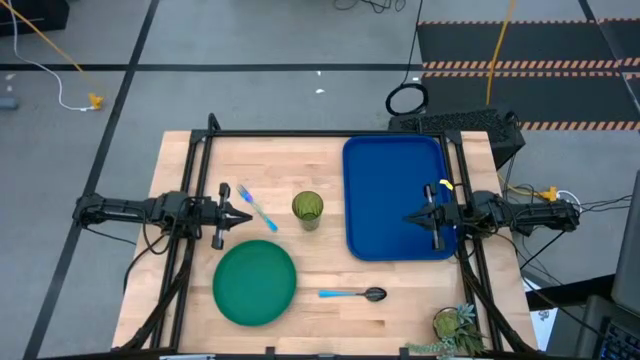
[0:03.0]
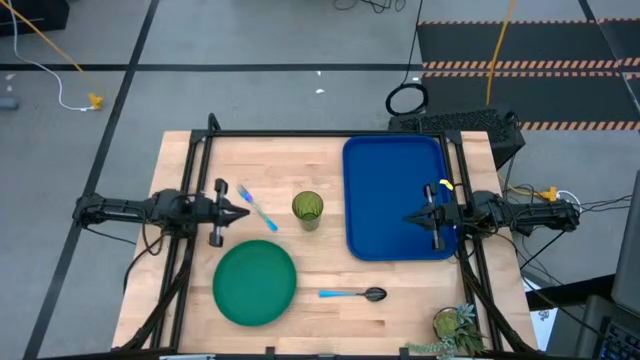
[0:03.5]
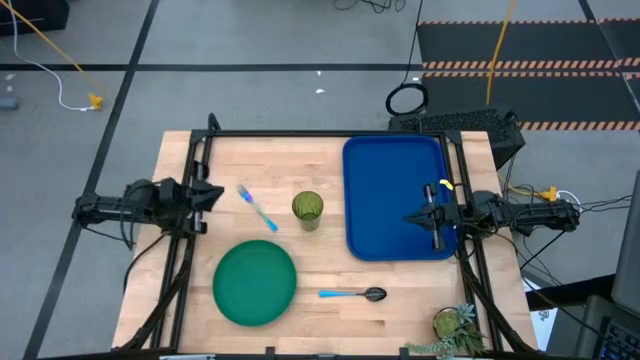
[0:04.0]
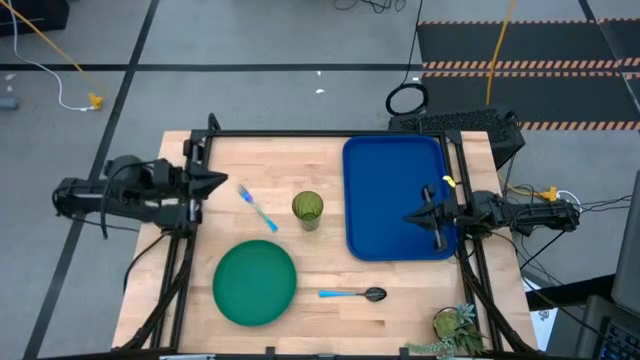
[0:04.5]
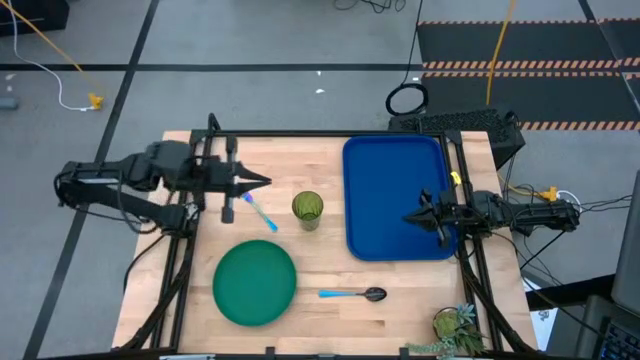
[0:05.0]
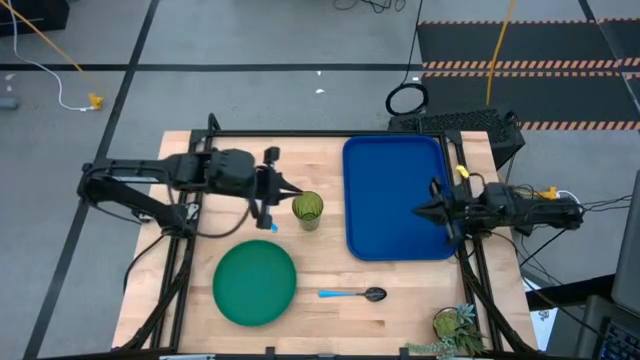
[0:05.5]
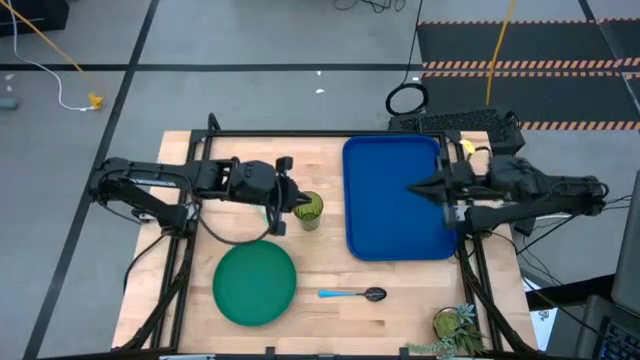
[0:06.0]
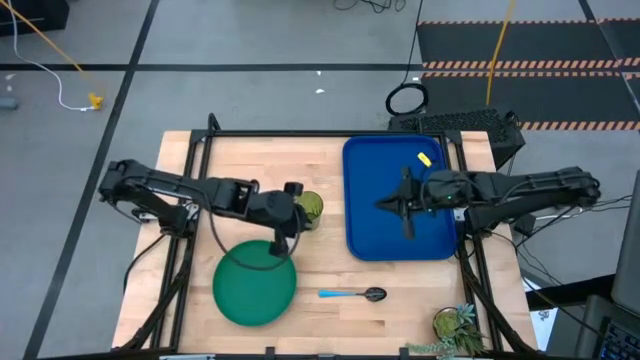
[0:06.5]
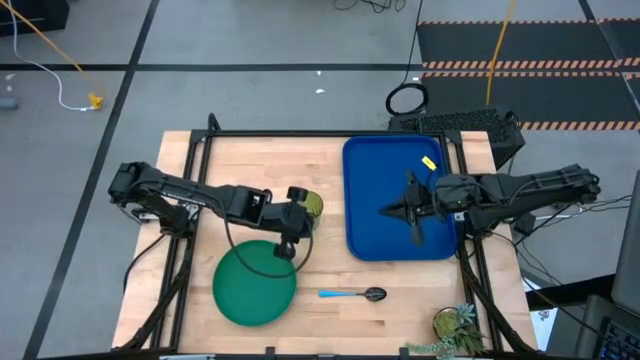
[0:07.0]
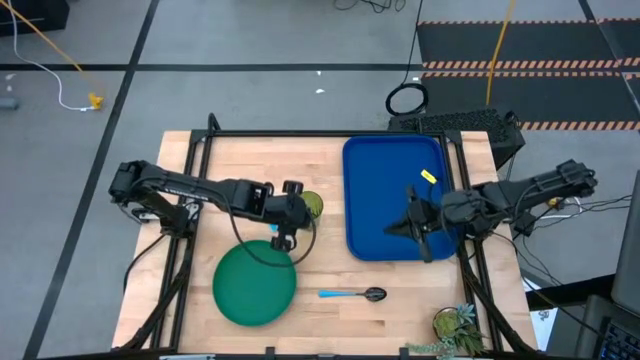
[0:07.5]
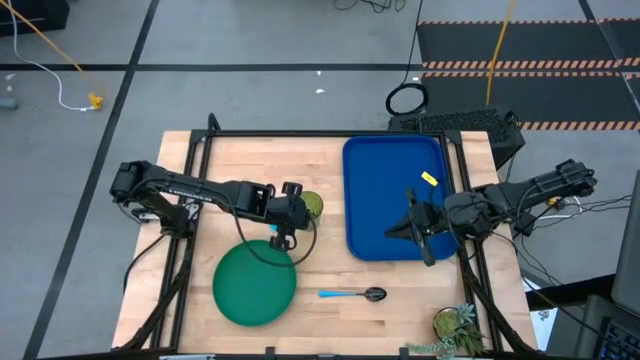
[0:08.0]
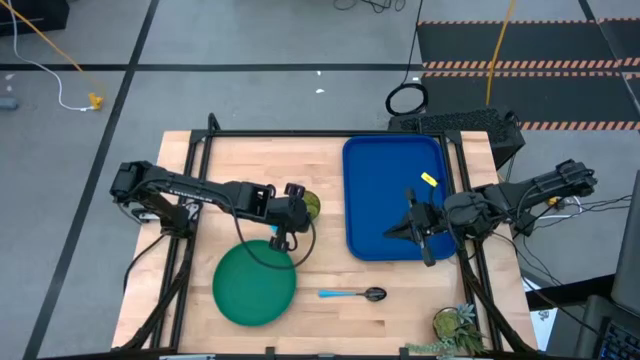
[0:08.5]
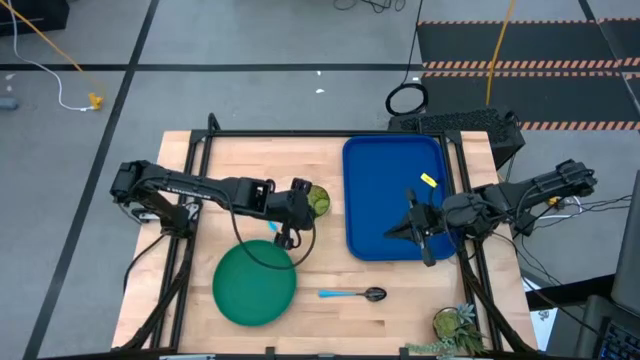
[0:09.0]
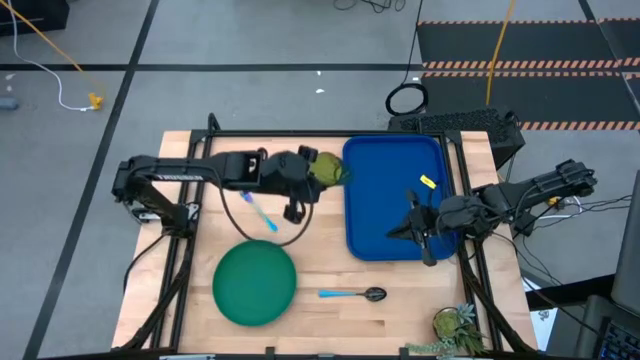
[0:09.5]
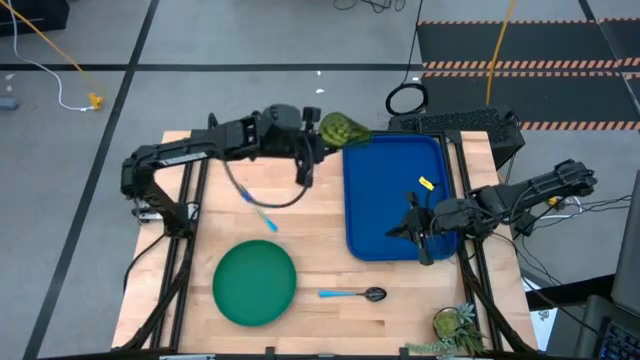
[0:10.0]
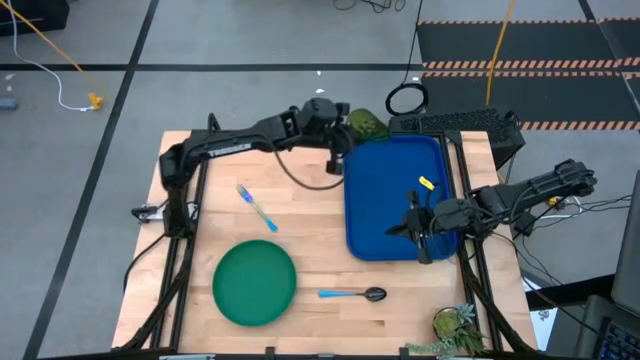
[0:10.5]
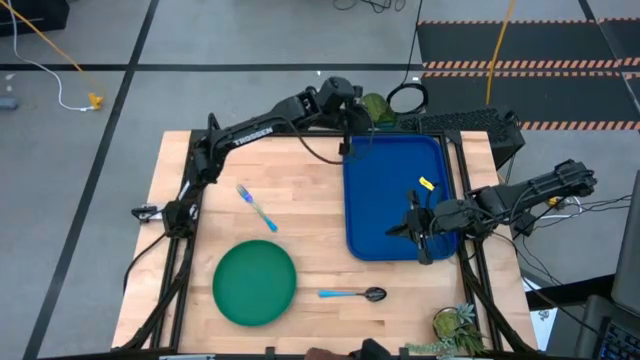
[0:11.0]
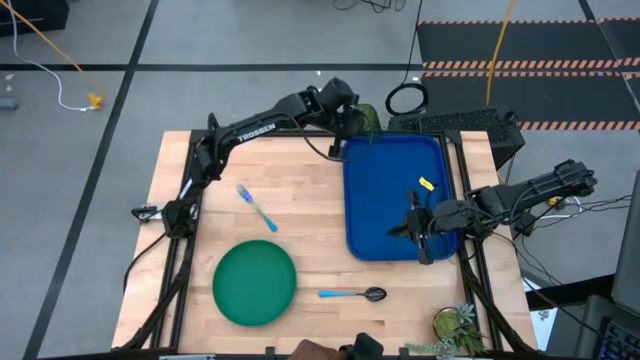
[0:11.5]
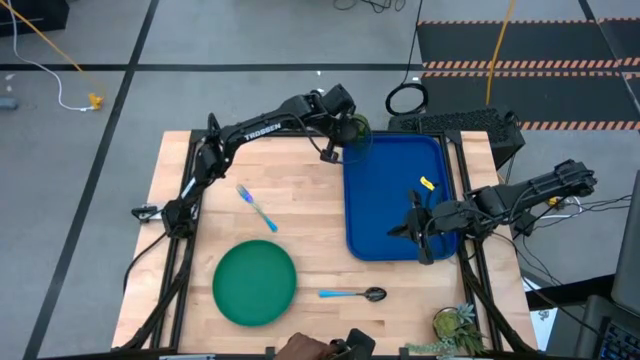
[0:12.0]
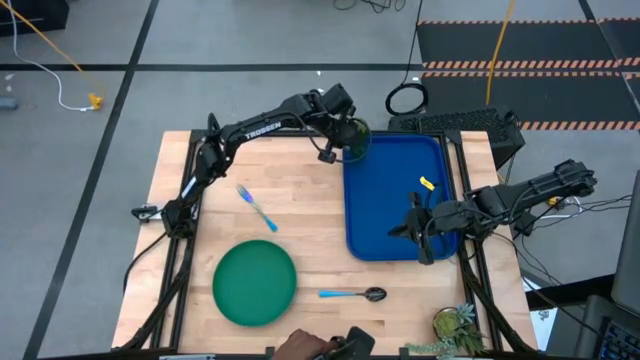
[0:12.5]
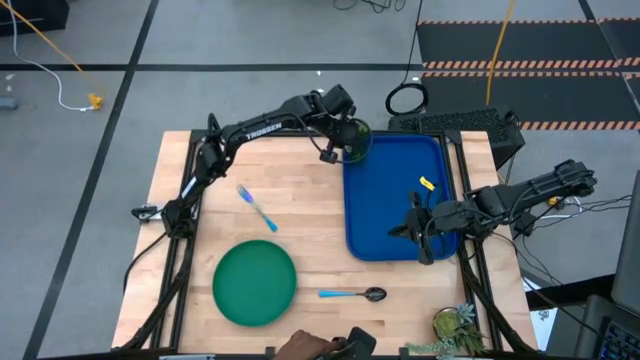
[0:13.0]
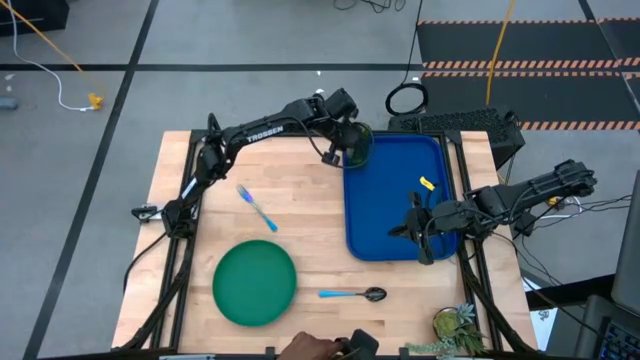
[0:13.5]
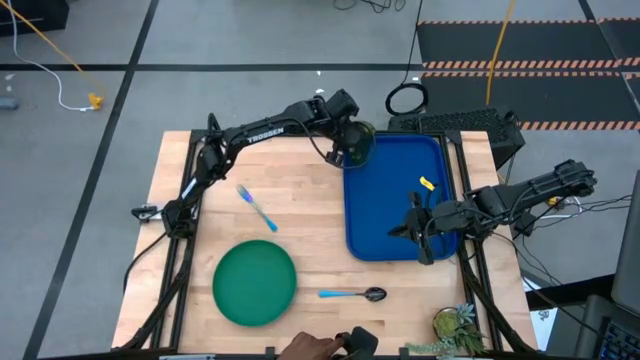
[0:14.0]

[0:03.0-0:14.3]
Task: Pick and place plate/cup/fork/spoon on tray
Put the green cup on the top right of the blue tray

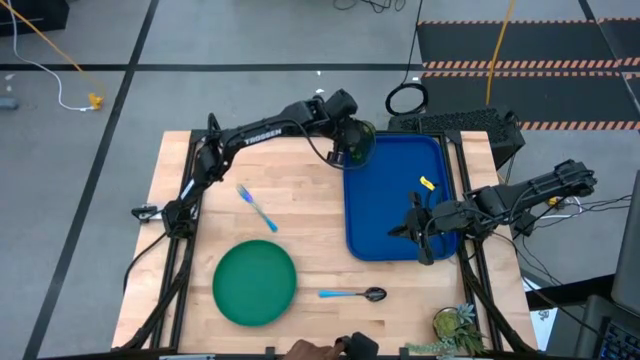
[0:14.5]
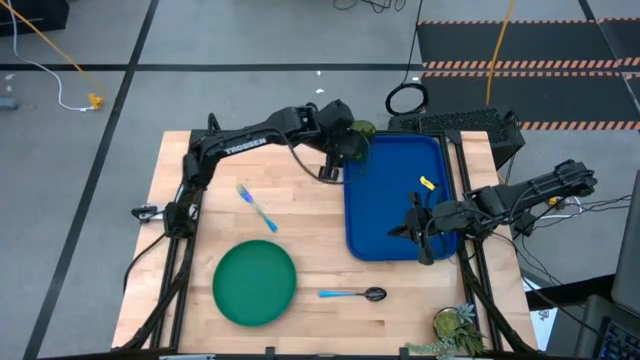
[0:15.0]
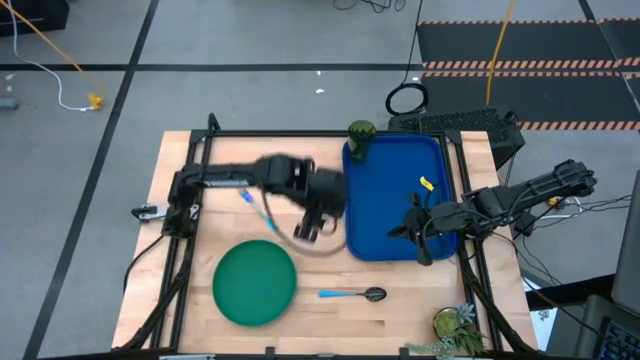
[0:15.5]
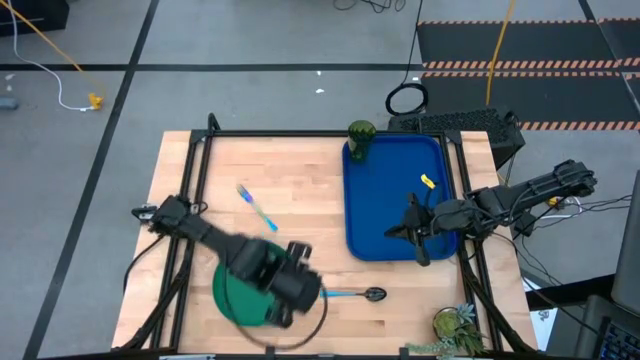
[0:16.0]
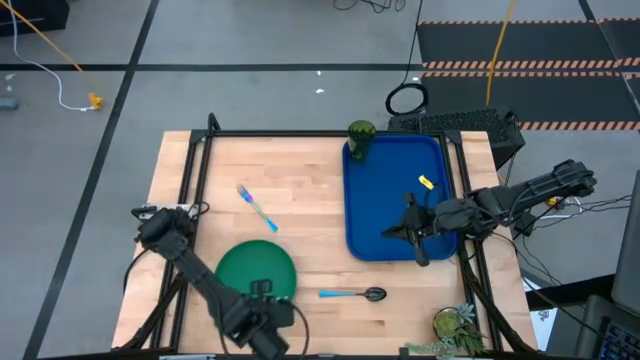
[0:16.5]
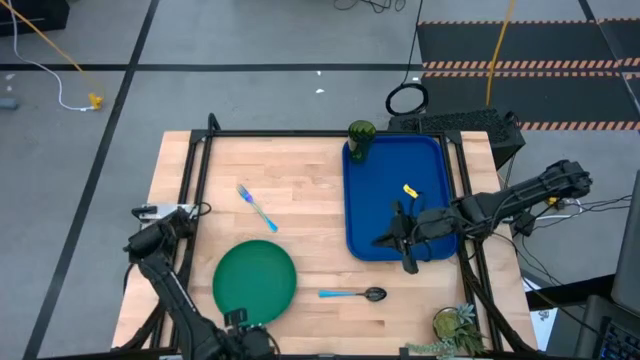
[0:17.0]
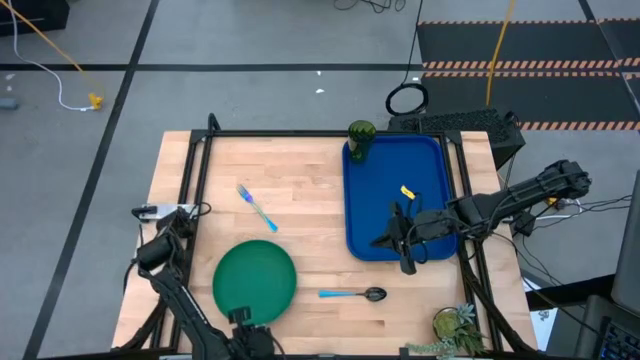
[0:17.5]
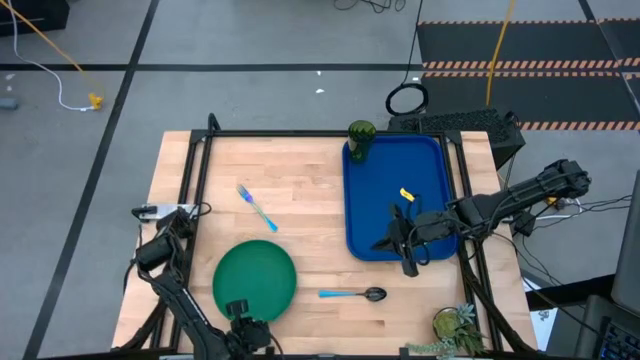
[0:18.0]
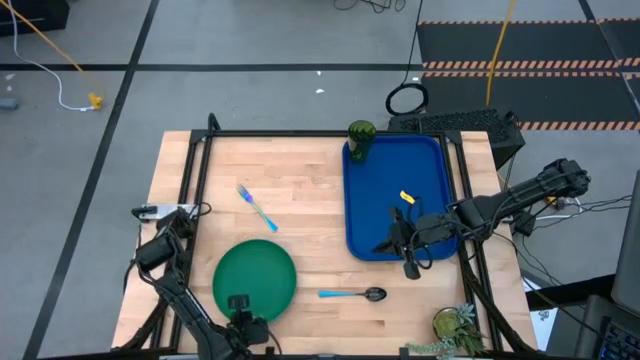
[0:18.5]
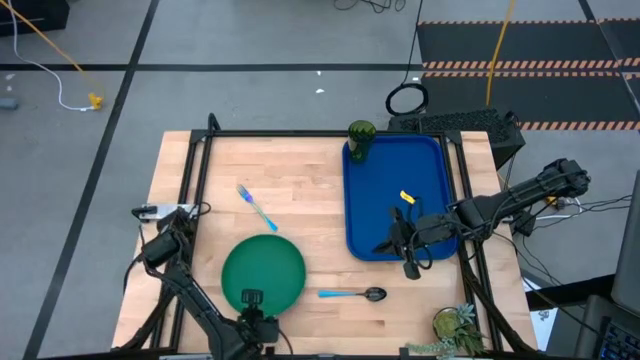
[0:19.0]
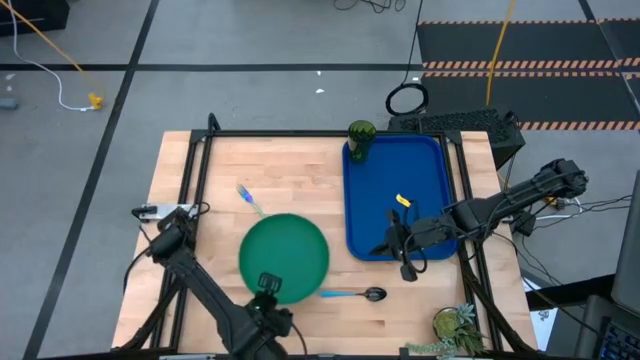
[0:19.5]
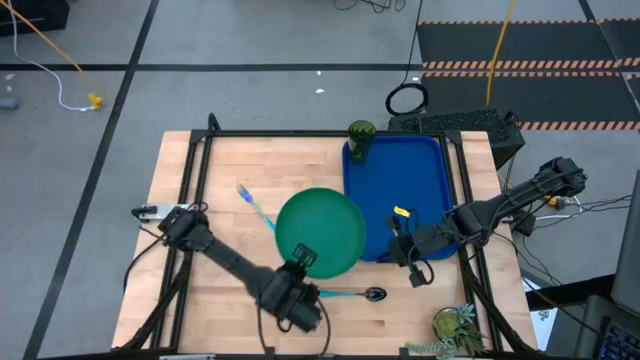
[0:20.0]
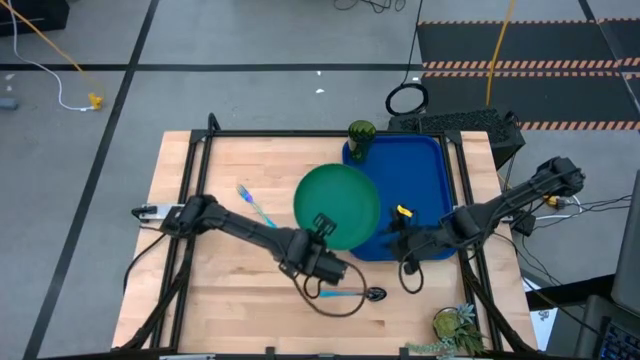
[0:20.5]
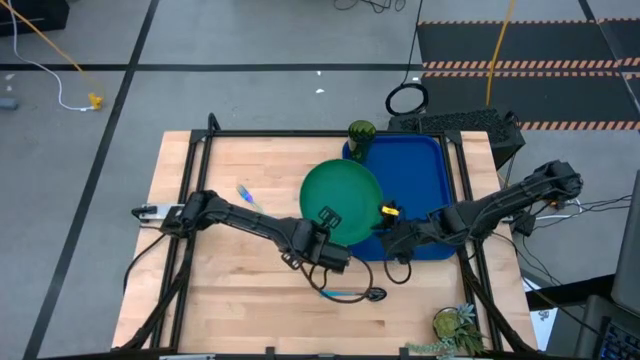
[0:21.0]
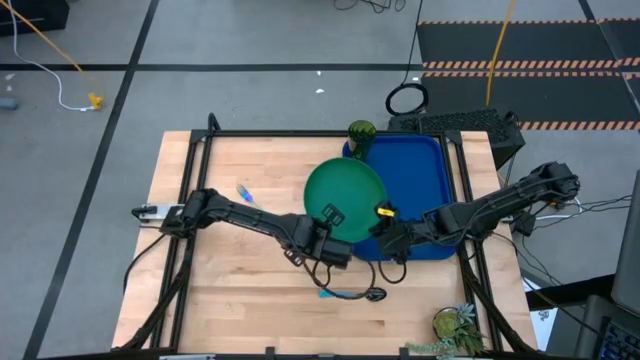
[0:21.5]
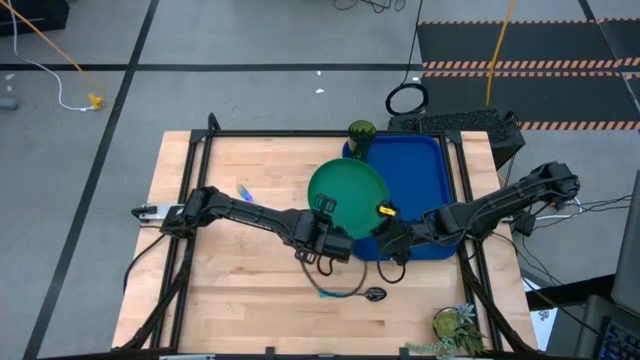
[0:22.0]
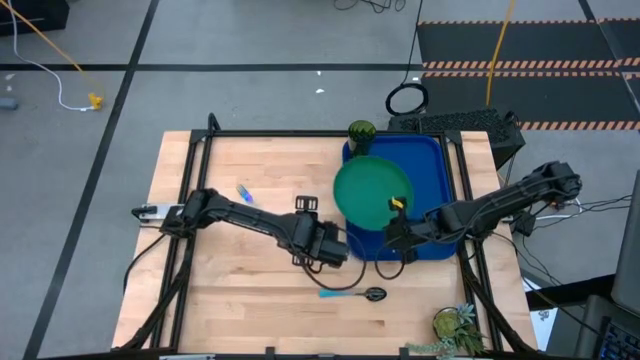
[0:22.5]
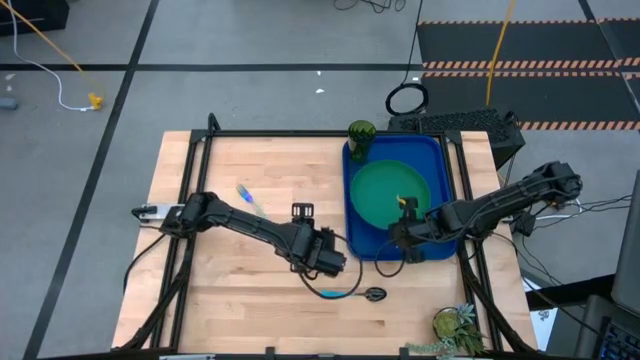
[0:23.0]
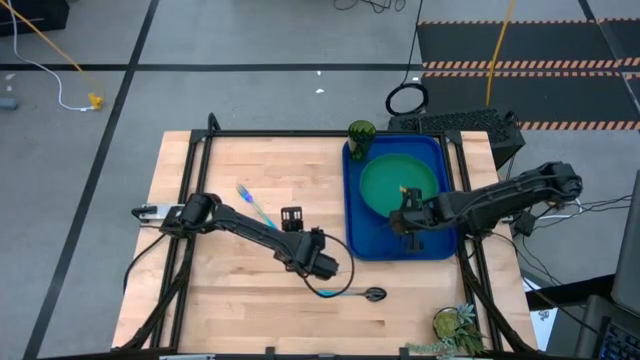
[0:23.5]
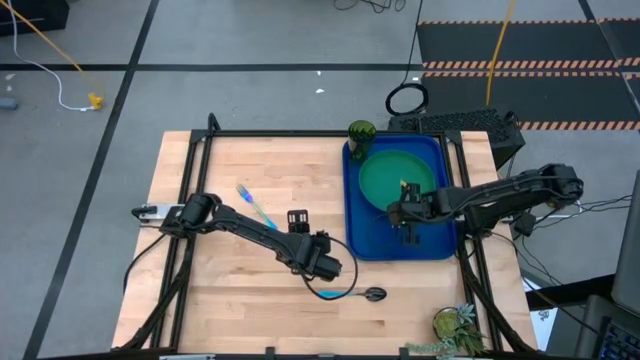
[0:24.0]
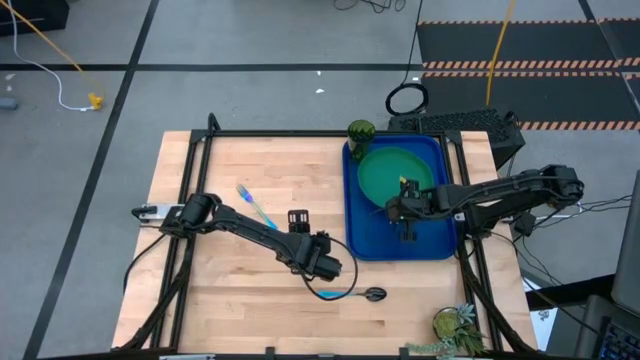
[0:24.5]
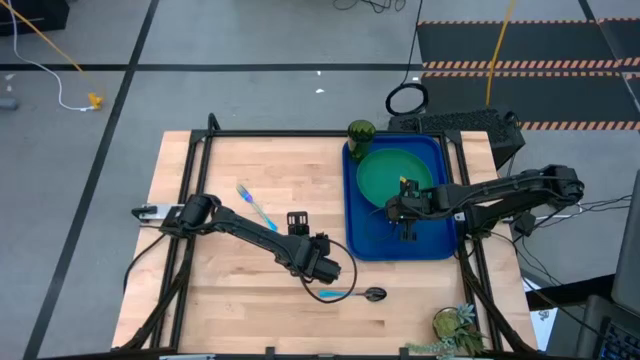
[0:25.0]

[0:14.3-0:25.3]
Put the green plate on the blue tray to the bottom left of the green cup
